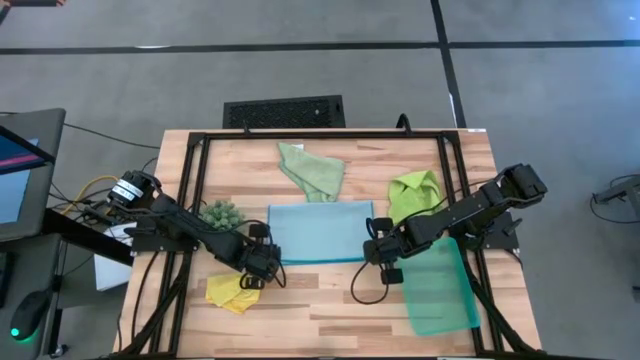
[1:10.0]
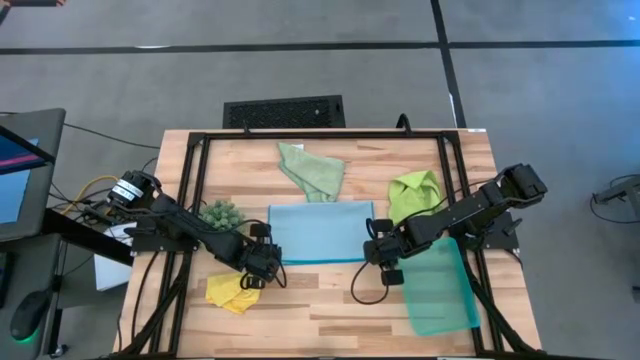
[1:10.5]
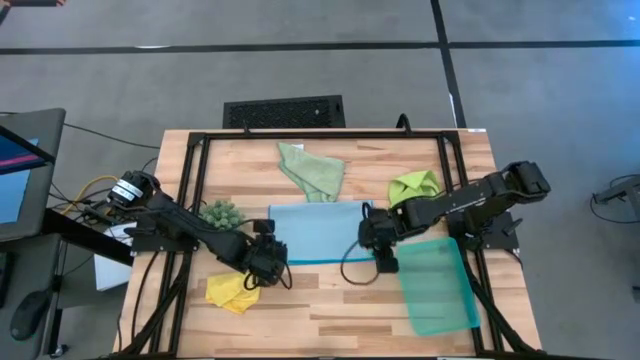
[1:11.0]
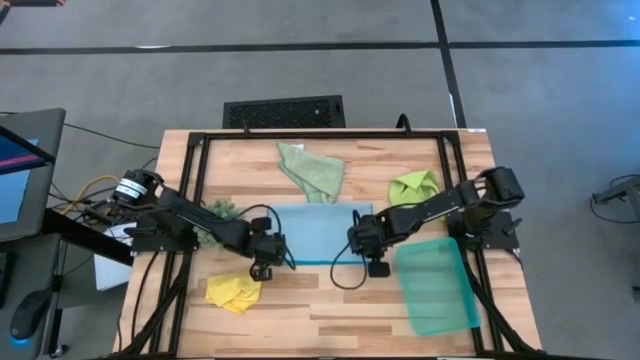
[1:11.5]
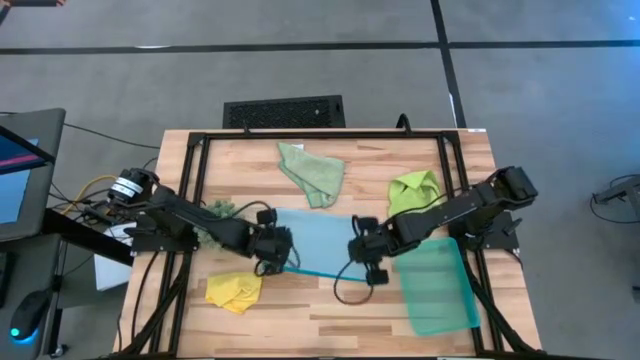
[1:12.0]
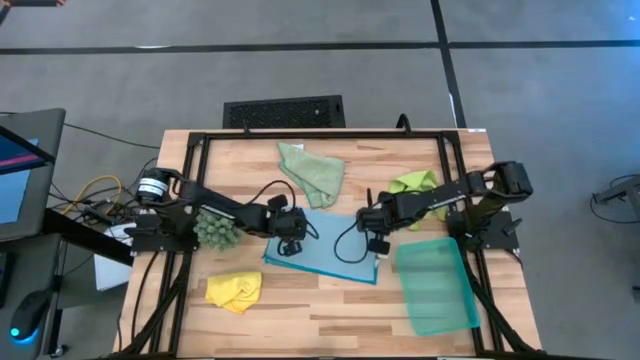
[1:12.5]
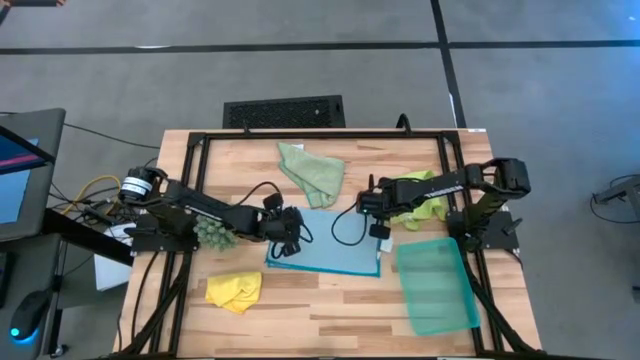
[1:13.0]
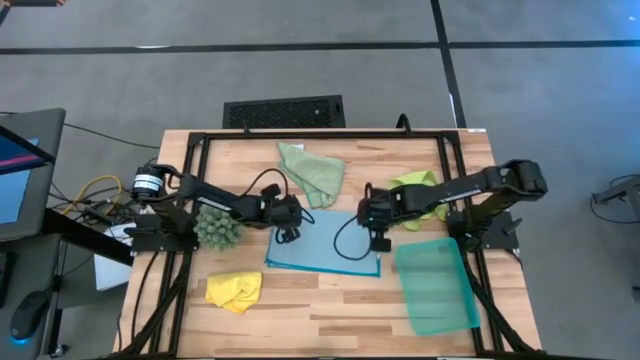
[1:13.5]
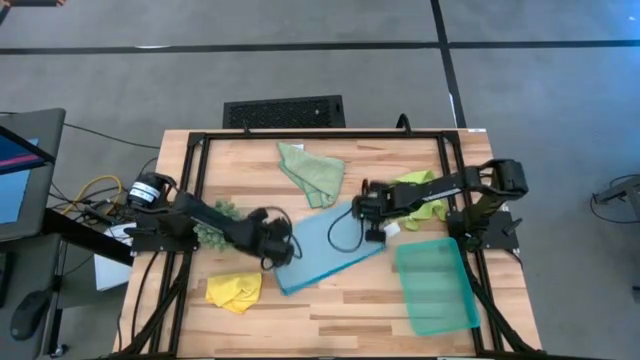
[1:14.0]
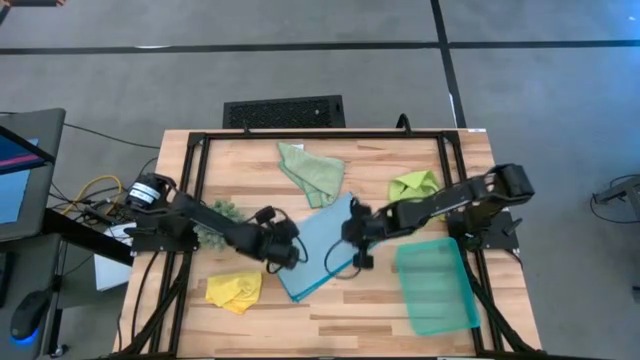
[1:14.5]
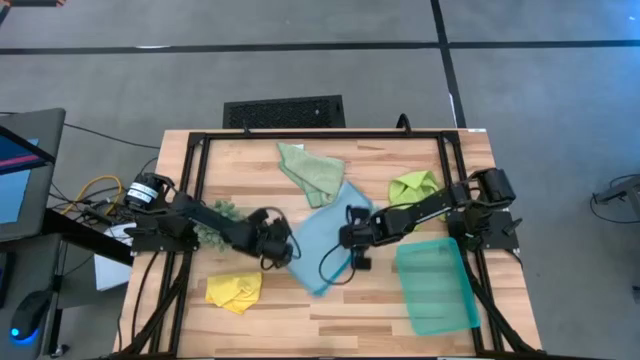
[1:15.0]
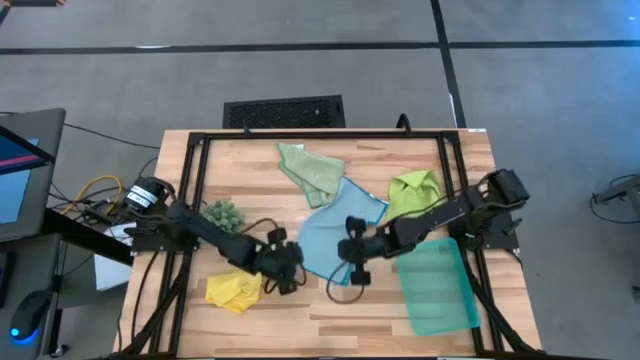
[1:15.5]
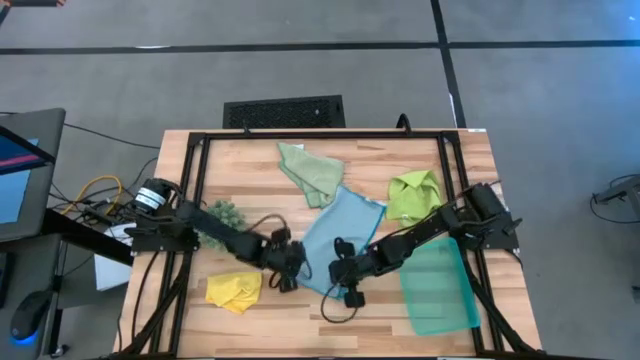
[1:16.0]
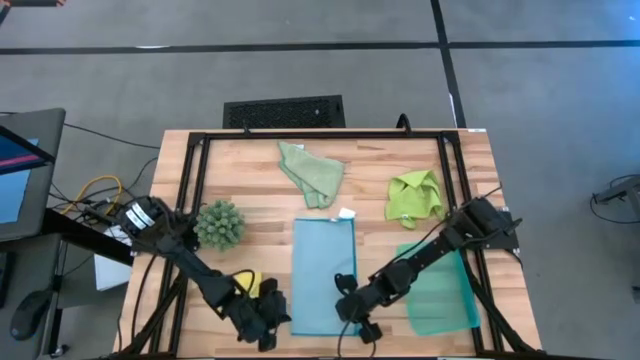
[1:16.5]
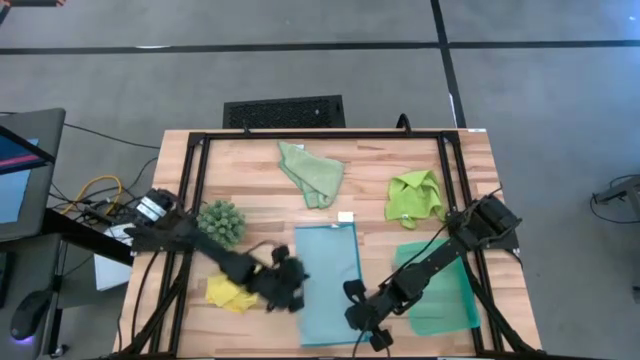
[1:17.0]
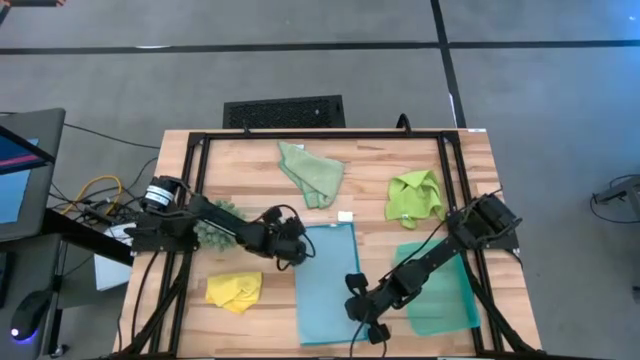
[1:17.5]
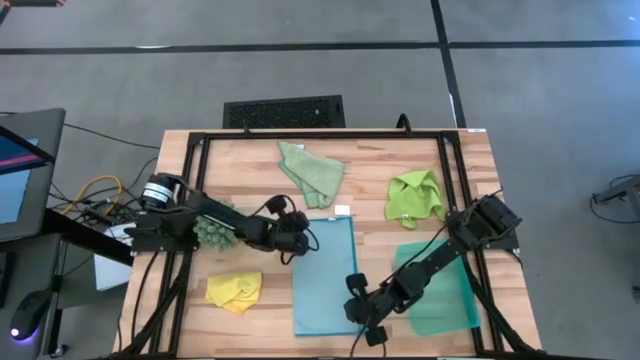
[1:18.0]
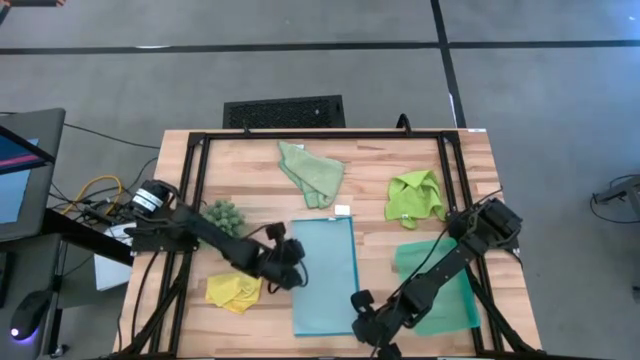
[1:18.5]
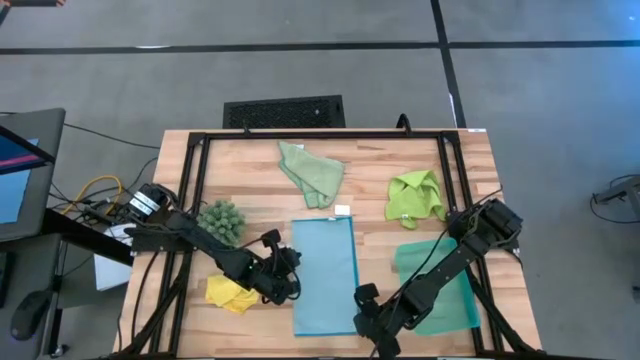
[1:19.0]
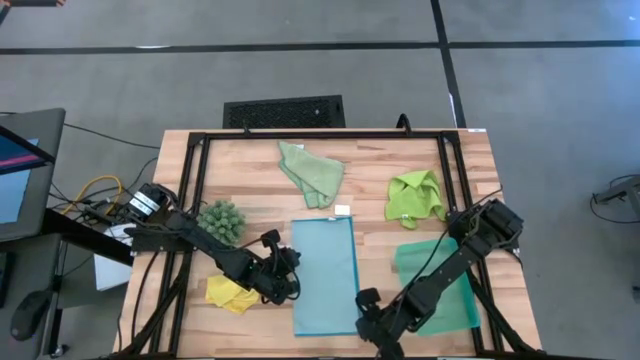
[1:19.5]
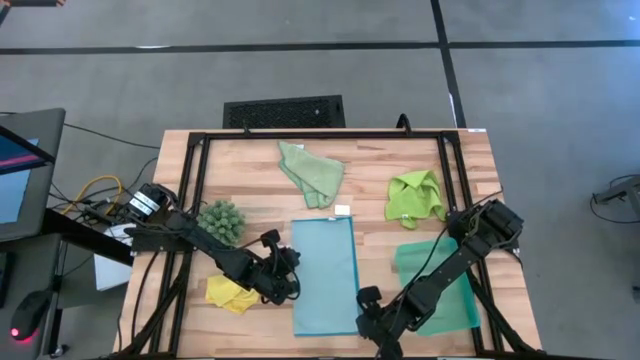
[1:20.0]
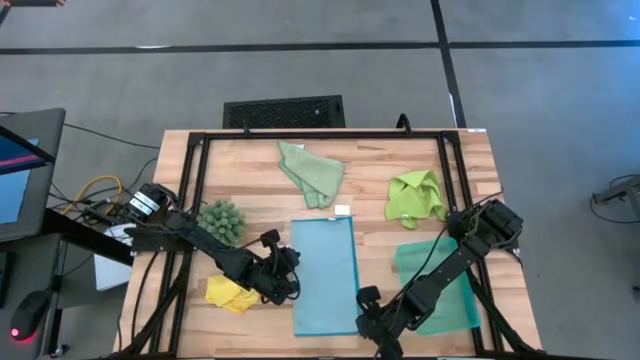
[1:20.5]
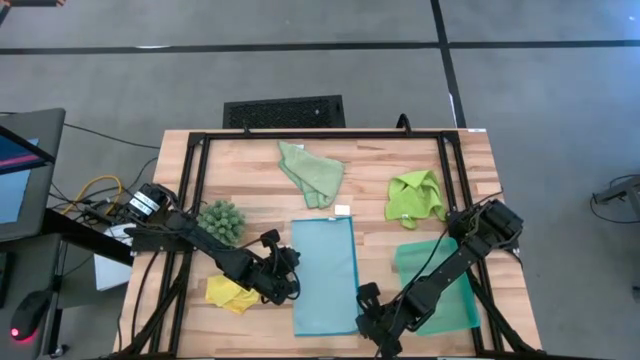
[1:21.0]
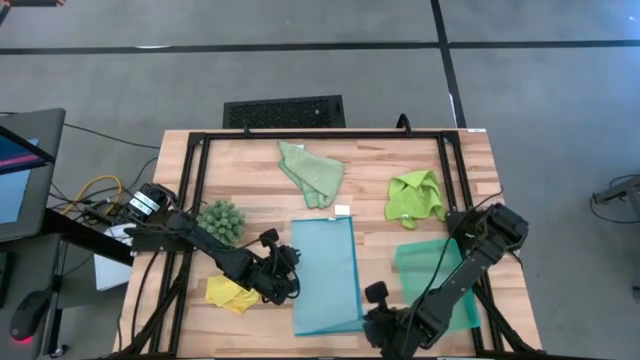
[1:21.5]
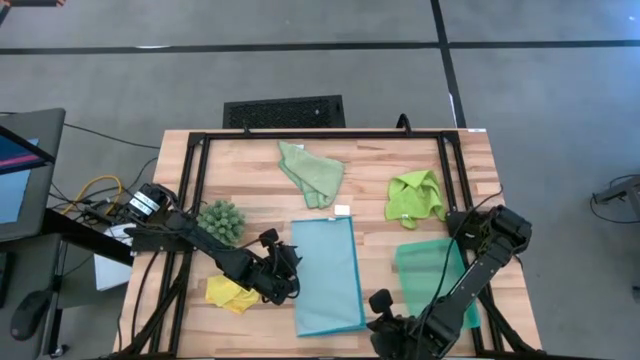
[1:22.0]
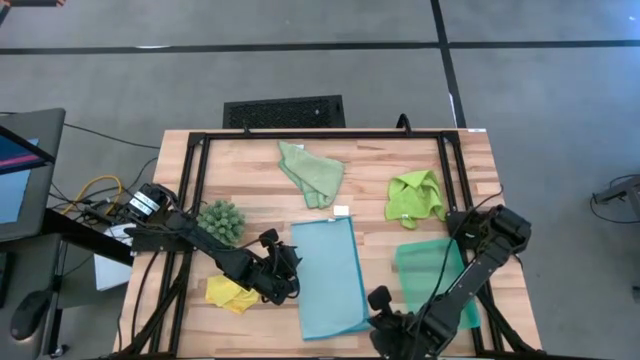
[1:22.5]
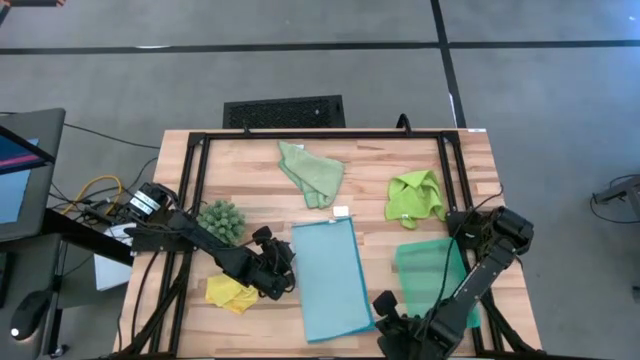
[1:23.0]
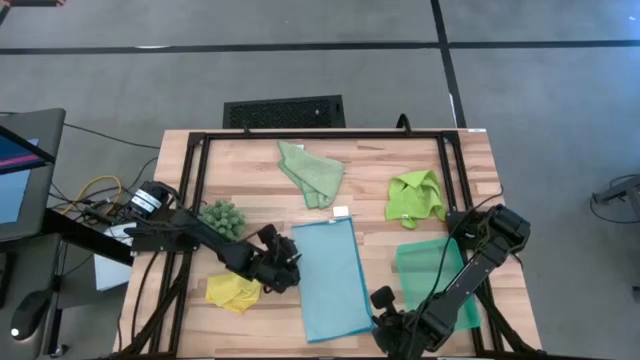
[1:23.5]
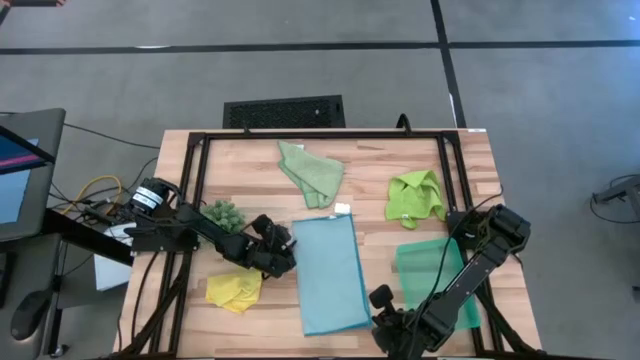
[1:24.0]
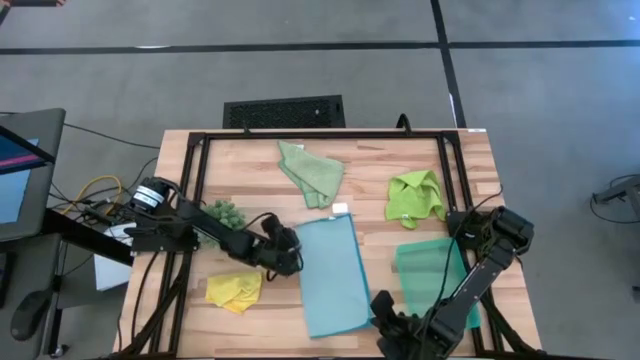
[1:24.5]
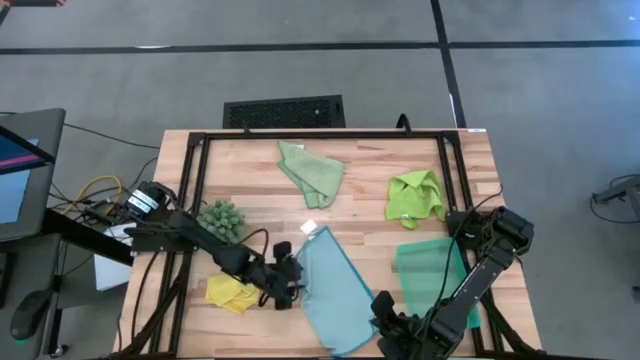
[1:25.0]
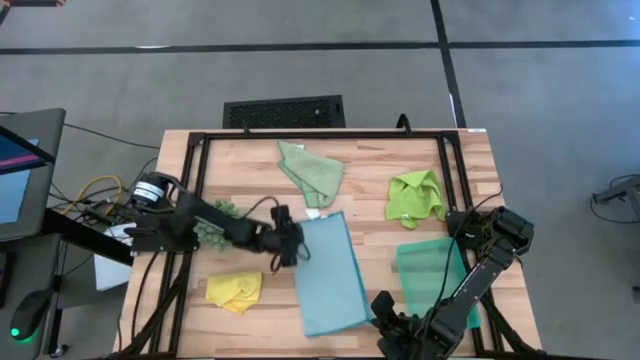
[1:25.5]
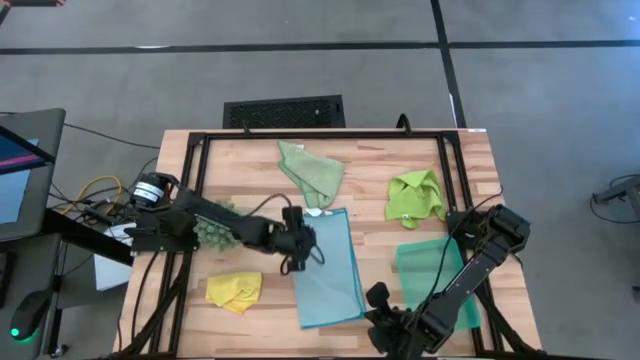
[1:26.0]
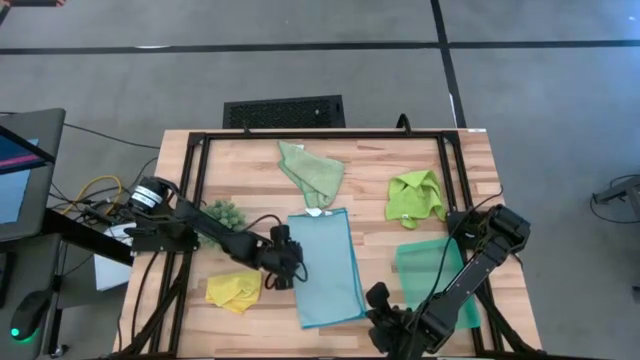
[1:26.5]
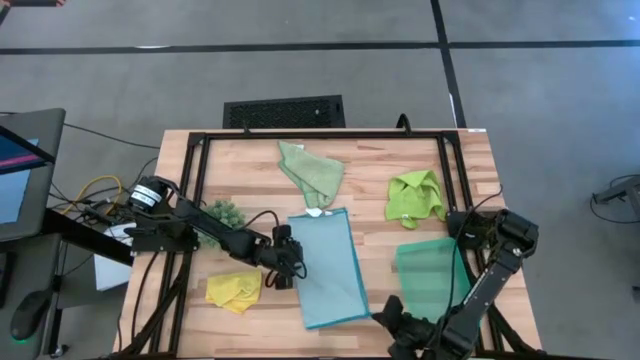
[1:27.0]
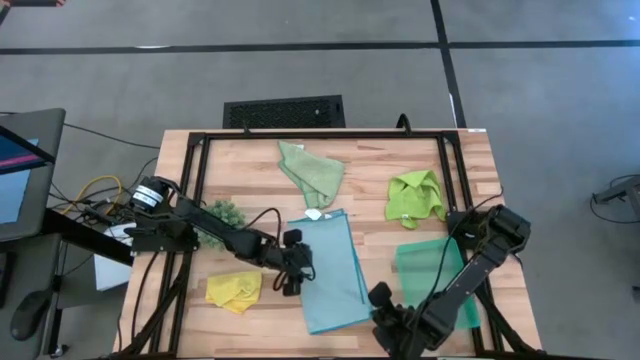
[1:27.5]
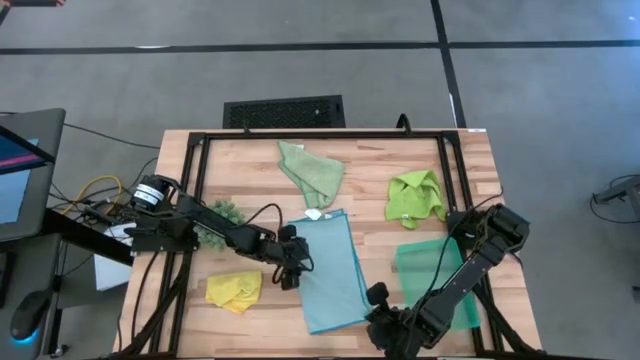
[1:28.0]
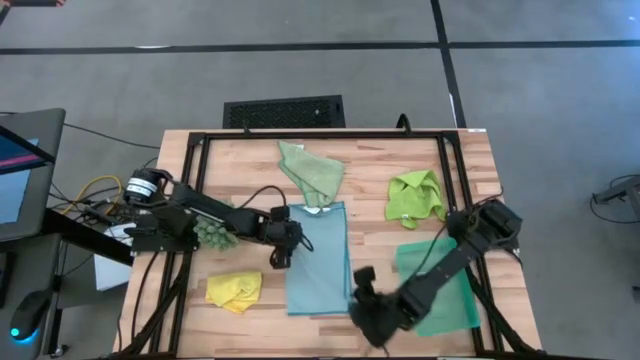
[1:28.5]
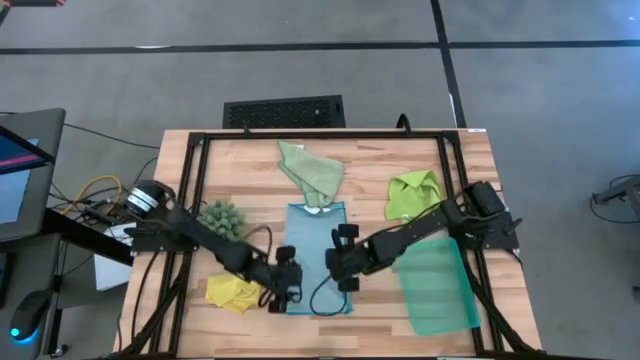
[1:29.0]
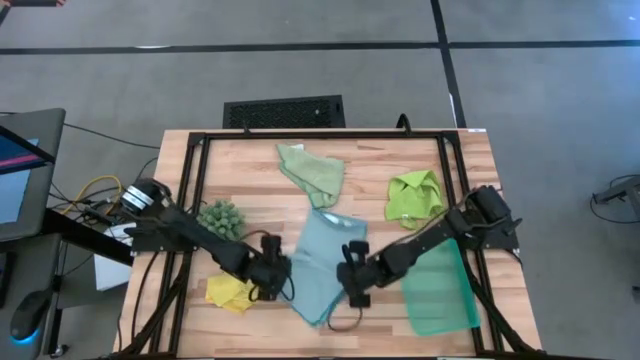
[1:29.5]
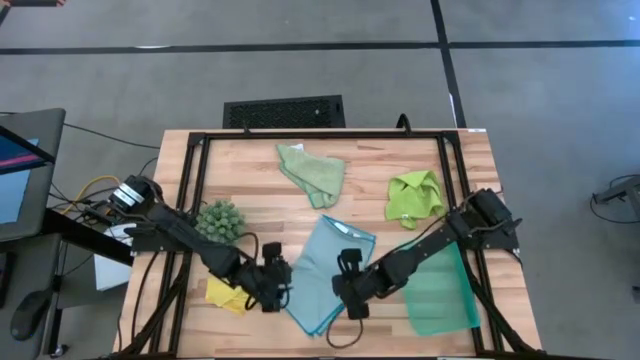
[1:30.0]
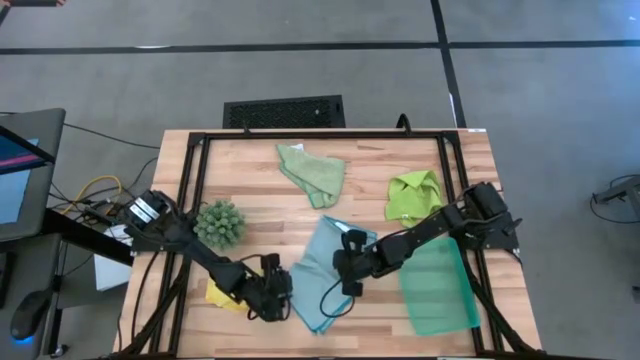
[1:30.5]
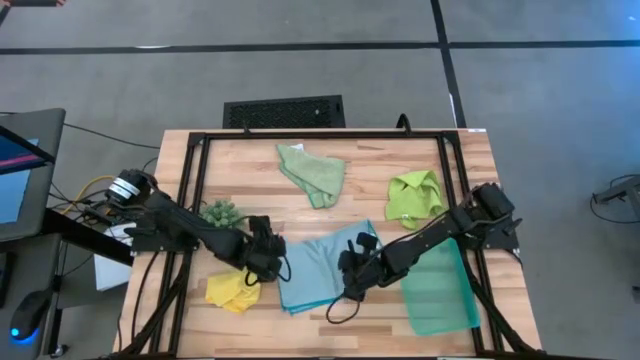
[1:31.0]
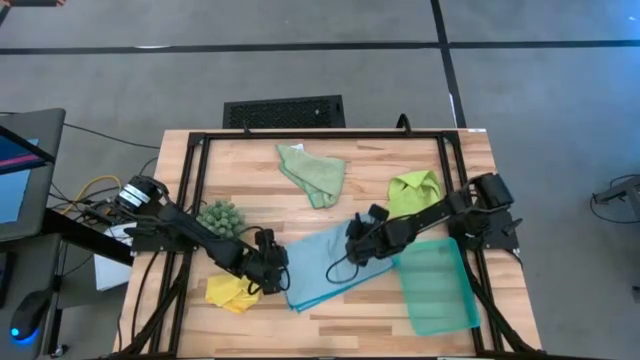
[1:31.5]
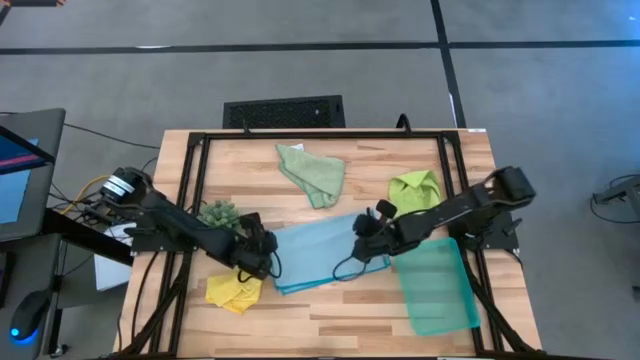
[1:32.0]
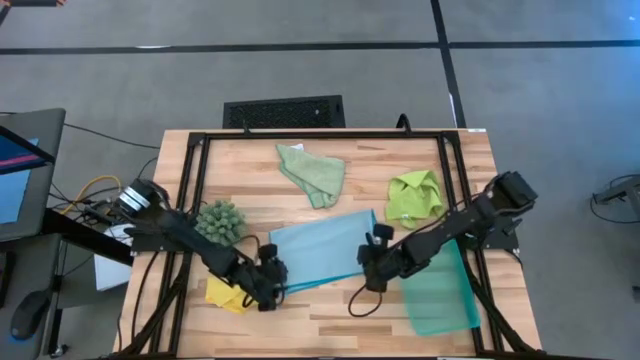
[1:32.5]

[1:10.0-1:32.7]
Task: Fold microfiber towels
Fold the blue microfiber cloth
